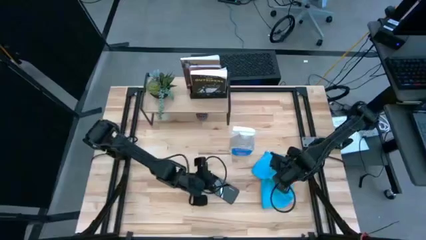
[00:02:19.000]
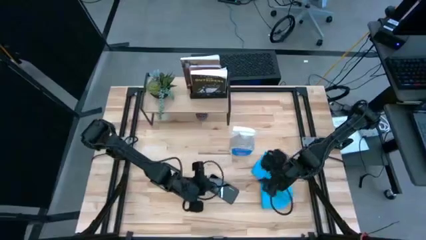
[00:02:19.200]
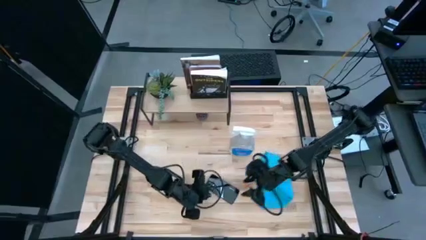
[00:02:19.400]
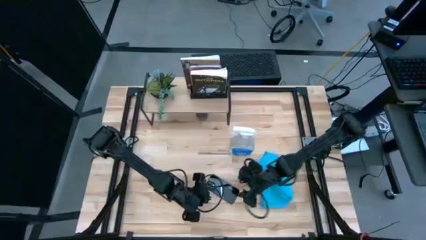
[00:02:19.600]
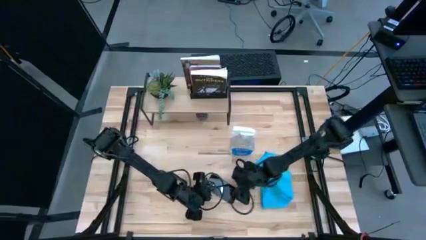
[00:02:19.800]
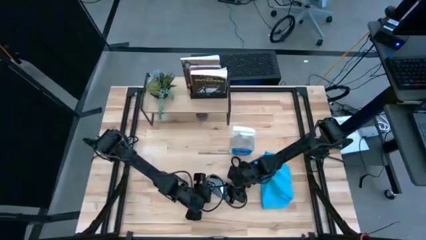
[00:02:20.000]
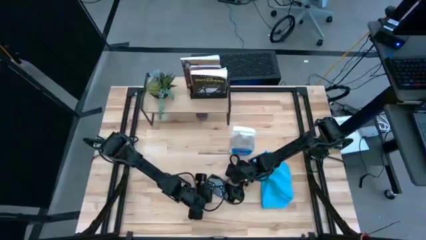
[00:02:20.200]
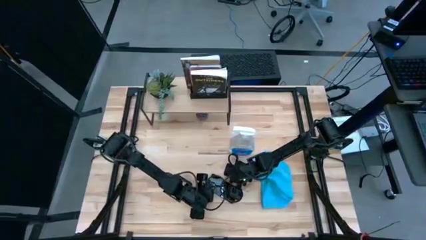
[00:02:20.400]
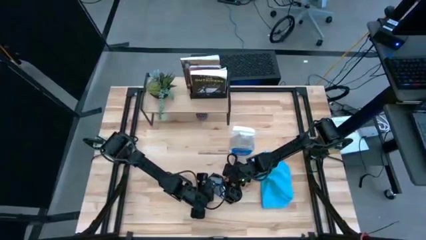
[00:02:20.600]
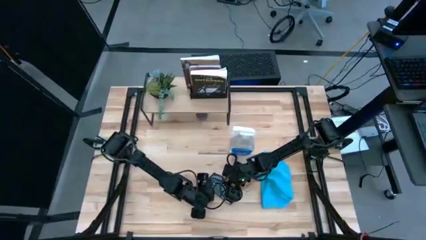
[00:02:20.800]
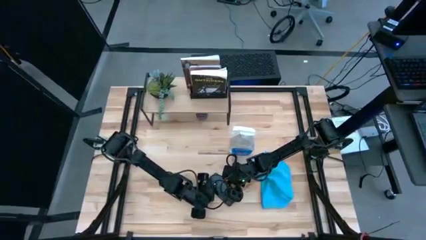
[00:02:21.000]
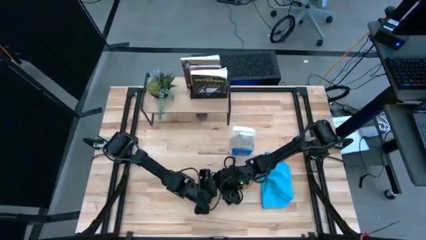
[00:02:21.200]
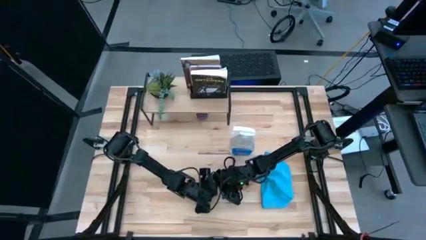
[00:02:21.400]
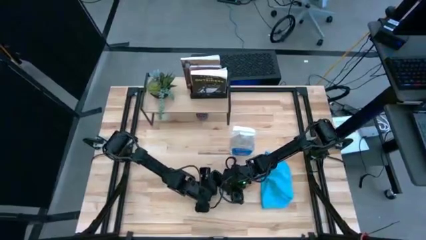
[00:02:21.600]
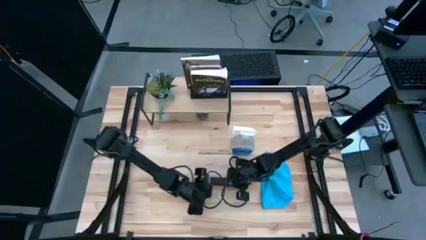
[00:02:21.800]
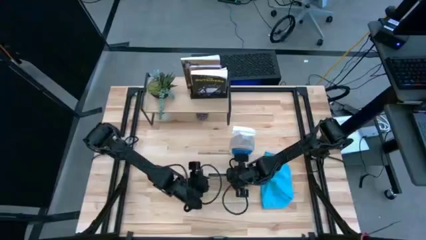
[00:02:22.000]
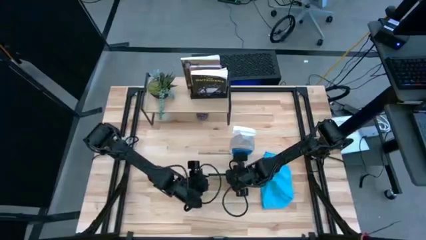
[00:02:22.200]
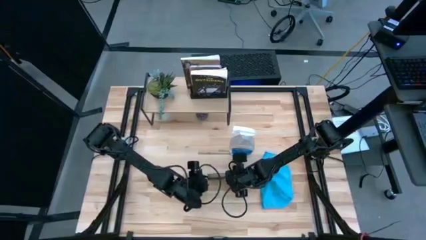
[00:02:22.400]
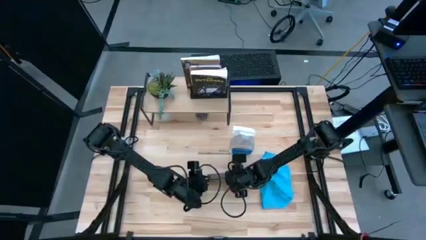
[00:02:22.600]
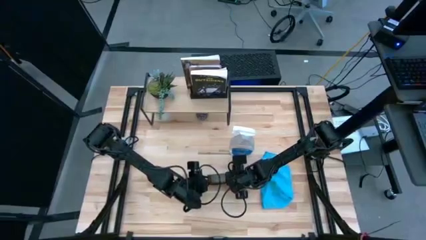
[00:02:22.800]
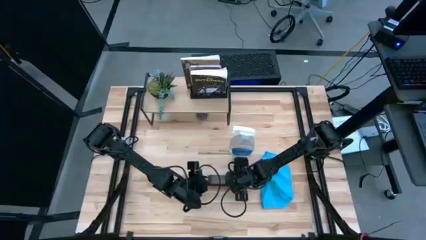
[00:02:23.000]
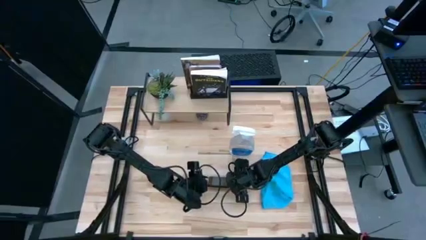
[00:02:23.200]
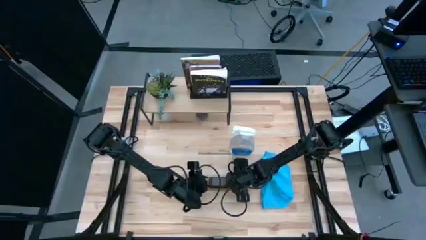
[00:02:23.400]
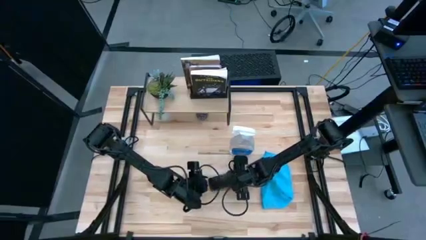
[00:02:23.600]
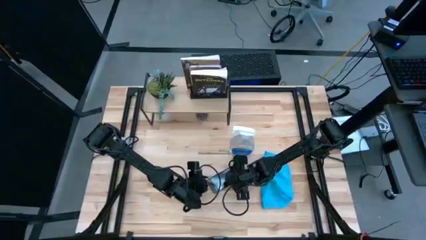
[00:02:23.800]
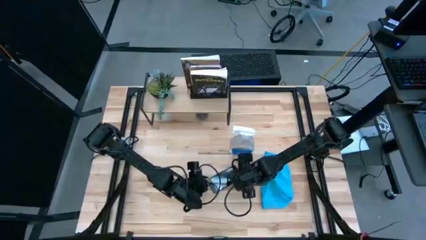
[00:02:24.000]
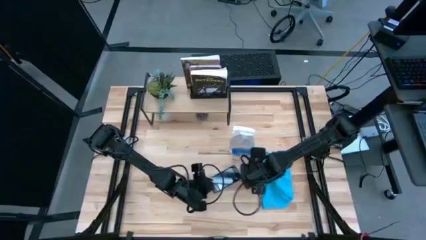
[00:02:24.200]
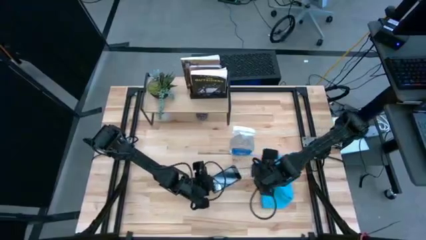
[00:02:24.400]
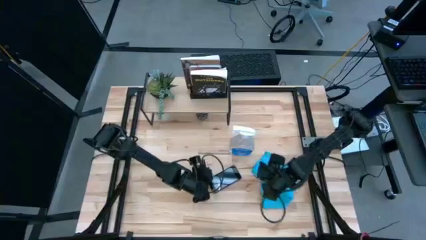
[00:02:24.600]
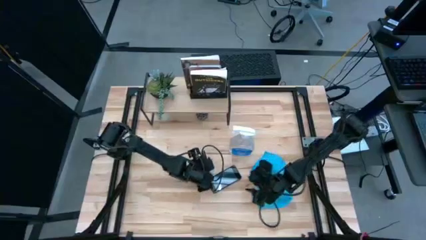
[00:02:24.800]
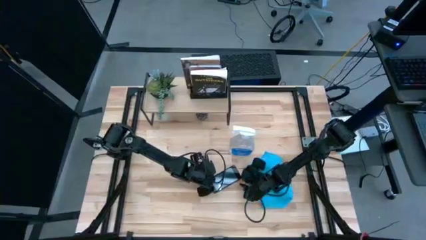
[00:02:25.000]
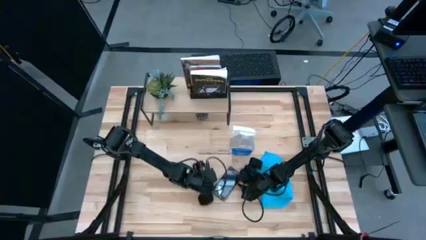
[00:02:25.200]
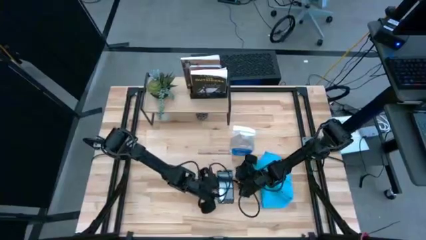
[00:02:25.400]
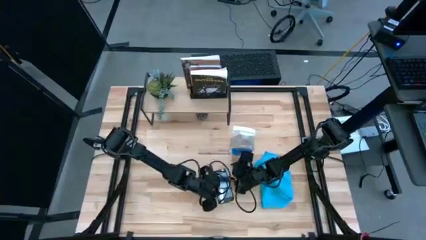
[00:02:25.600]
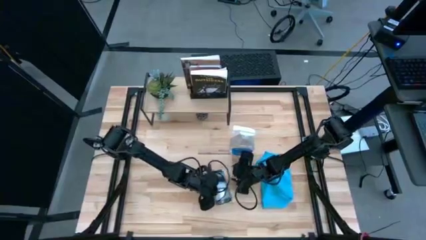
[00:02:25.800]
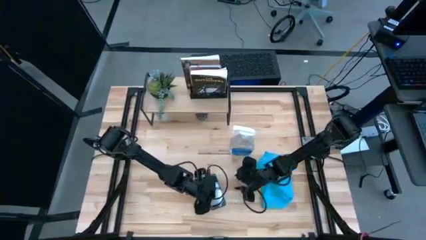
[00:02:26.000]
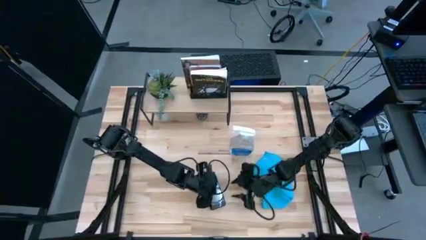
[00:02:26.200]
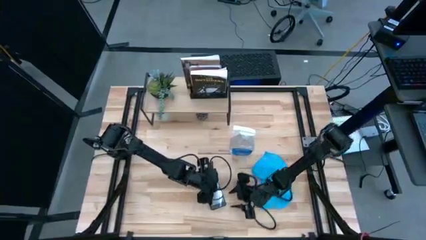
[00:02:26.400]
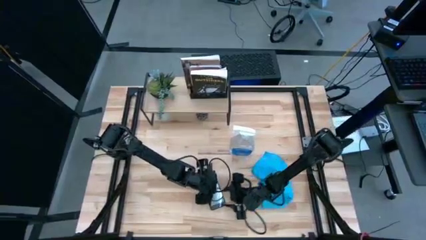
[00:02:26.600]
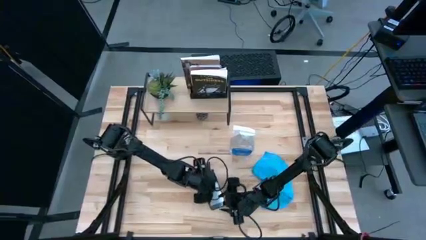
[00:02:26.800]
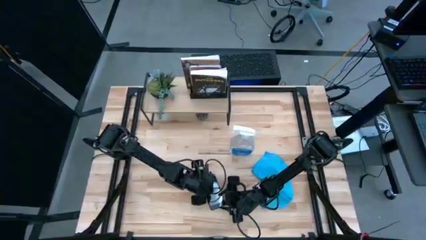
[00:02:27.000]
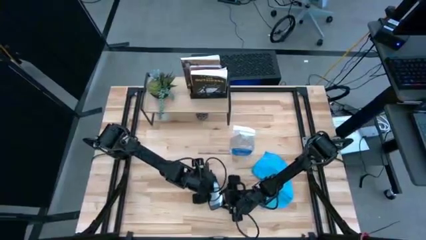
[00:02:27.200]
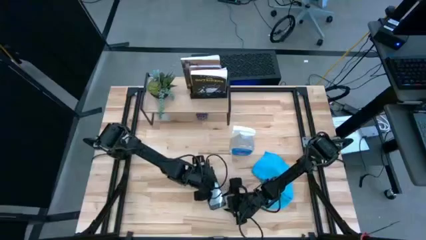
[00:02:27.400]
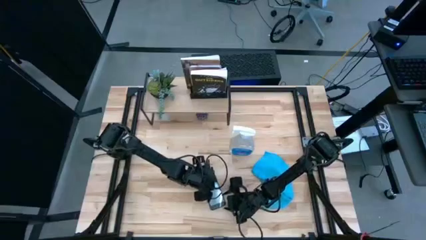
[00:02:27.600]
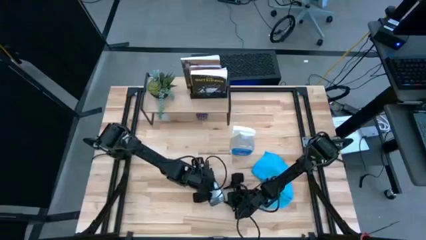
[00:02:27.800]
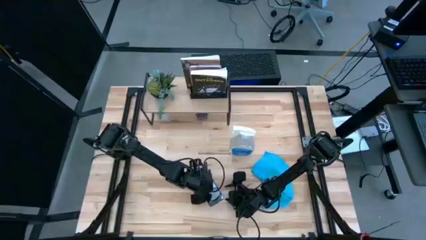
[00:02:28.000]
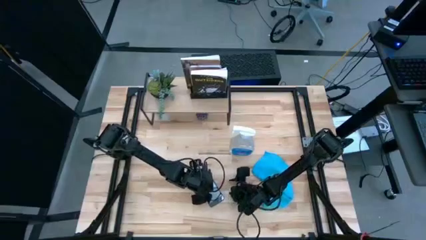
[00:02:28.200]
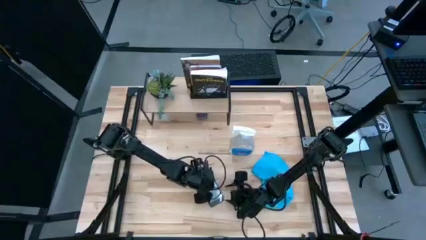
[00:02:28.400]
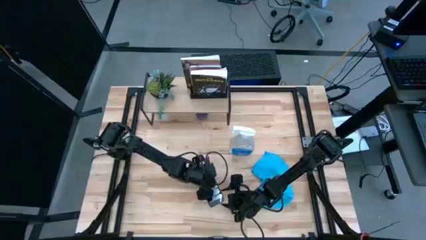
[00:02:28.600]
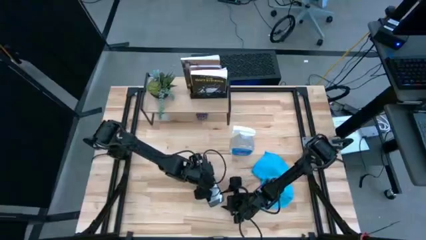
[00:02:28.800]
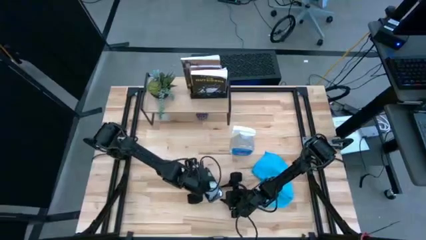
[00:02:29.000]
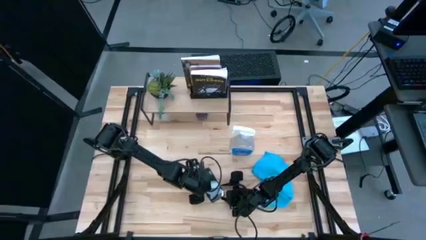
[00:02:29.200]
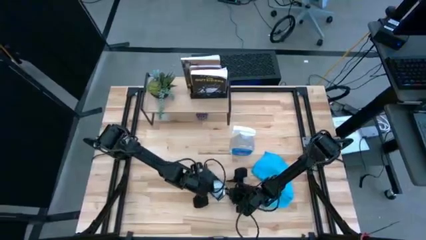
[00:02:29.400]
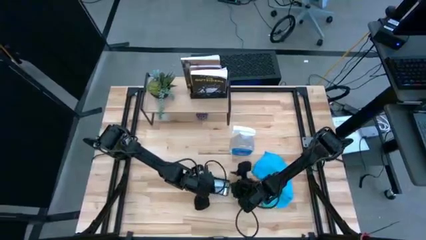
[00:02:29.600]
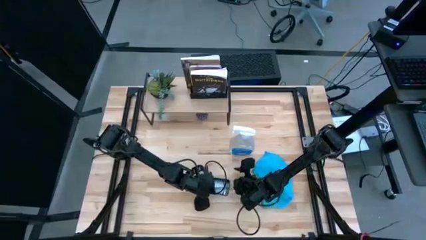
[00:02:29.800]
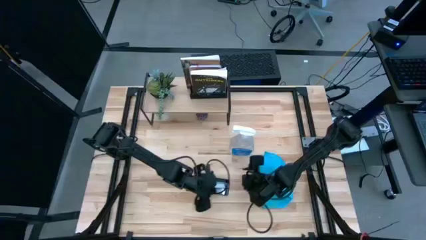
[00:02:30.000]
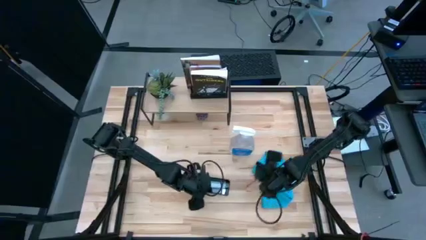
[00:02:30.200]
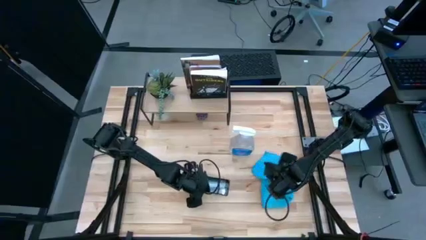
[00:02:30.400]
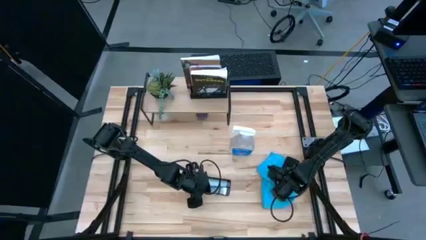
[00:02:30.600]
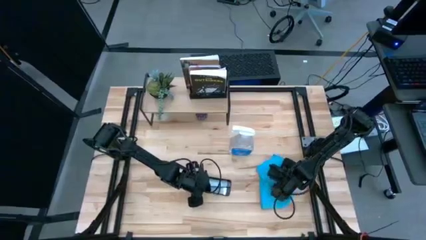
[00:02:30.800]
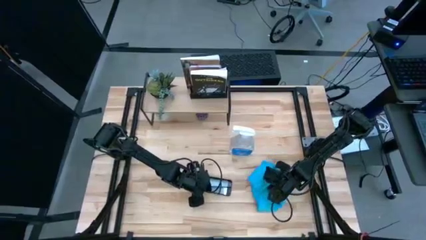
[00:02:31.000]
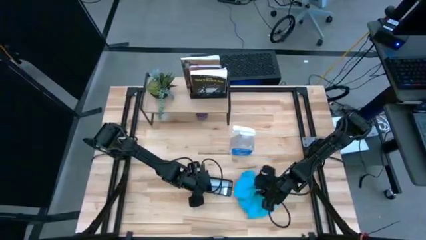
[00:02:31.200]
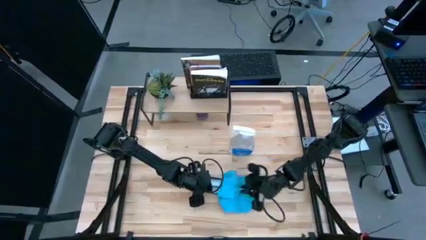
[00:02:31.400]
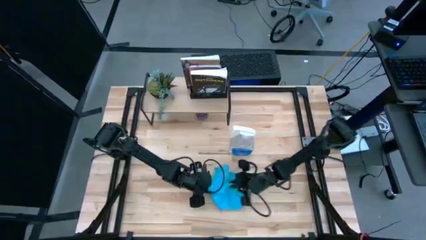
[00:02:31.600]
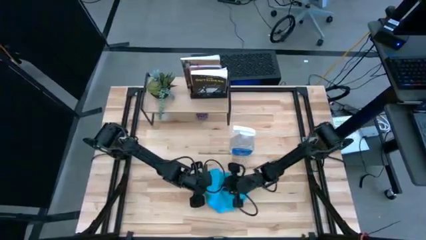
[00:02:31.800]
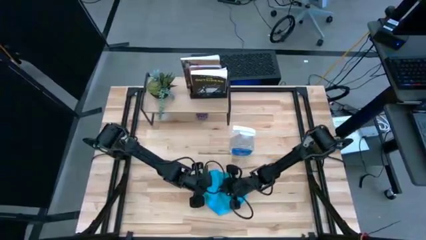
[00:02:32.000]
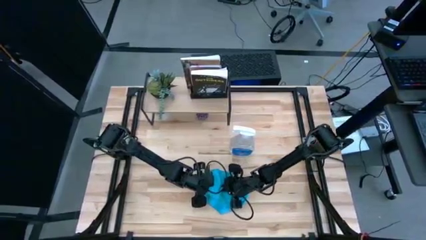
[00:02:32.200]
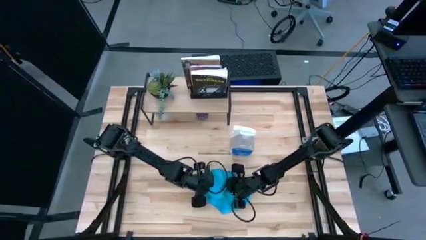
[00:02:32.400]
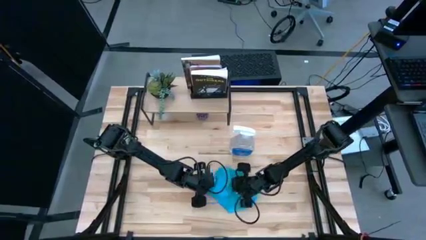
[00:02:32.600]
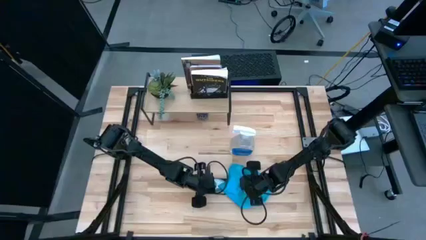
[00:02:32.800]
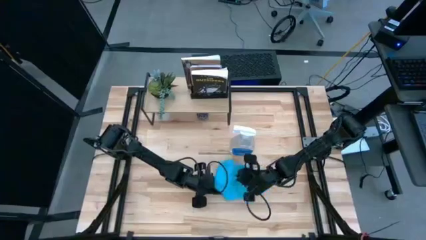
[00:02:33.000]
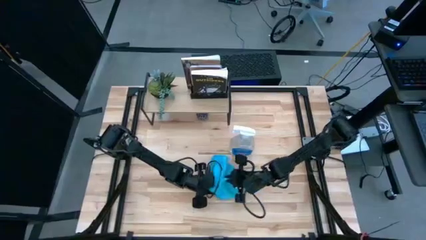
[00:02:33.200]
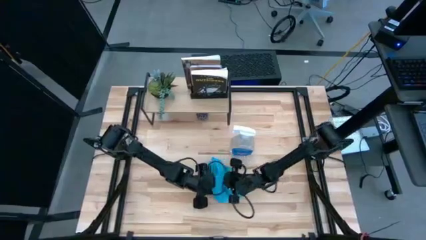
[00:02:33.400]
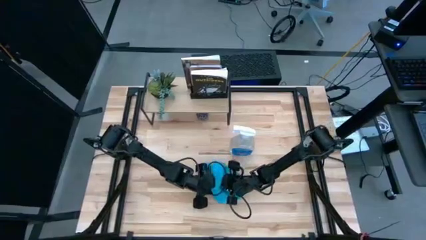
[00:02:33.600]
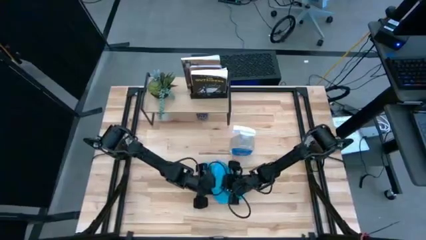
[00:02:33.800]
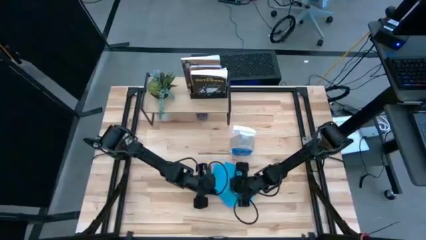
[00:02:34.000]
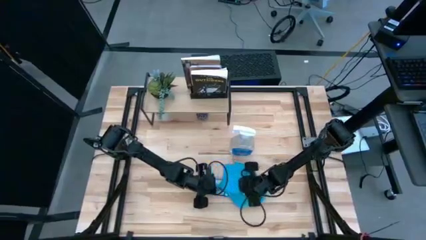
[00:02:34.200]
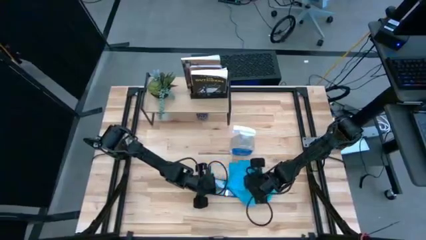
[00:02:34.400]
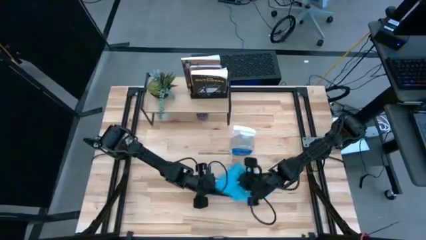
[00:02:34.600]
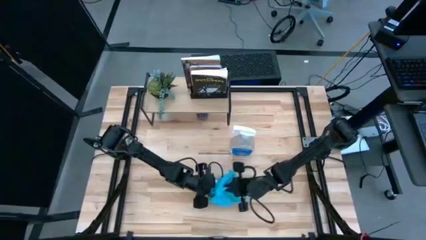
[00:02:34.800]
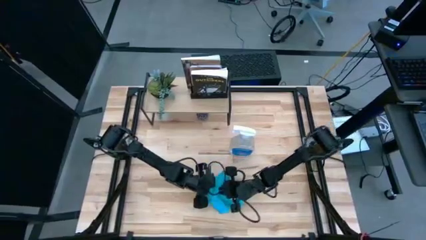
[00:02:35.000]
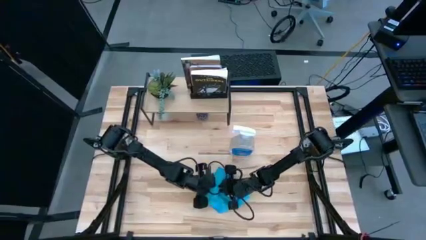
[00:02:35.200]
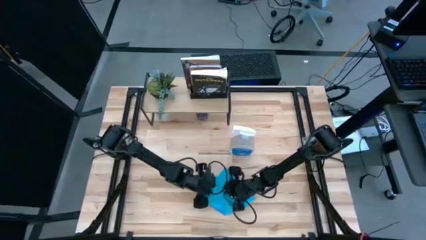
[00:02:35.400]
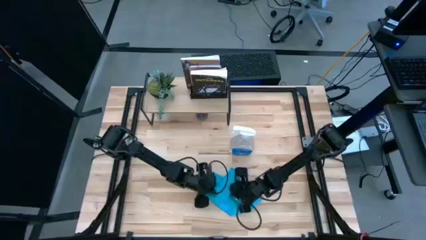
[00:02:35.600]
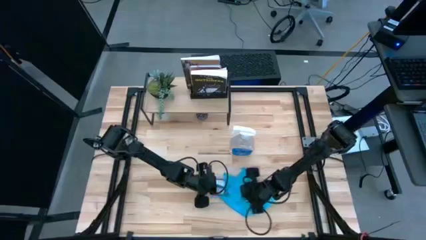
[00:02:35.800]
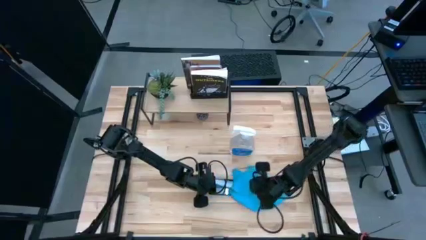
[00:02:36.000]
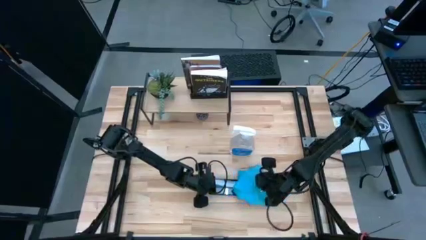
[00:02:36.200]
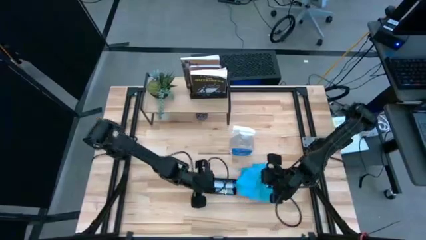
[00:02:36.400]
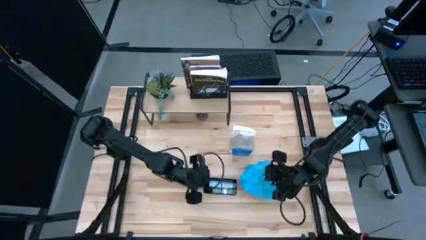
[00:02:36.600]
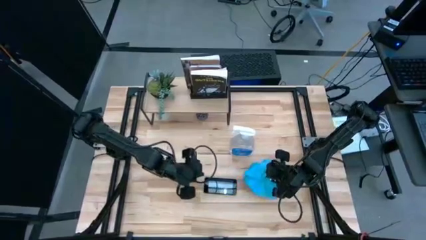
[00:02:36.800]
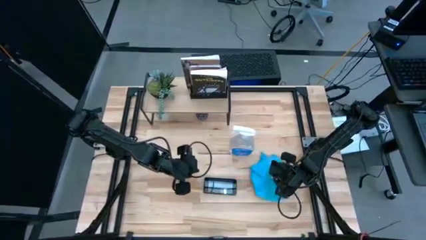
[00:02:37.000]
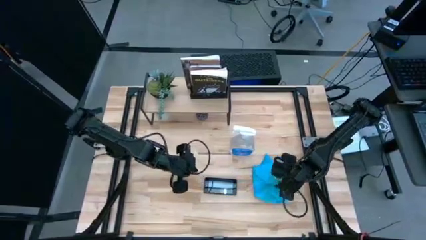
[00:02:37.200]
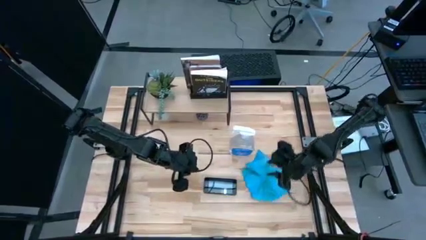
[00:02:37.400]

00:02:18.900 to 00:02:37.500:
Task: Apply microfiber cloth
Wipe the front of the black cellphone with a blue microfiber cloth
